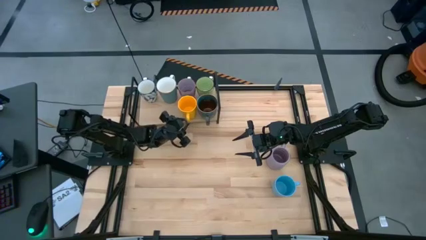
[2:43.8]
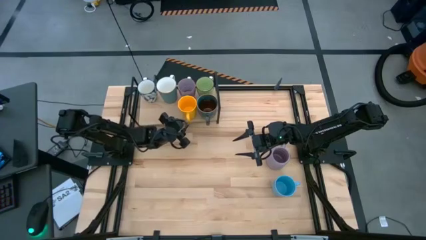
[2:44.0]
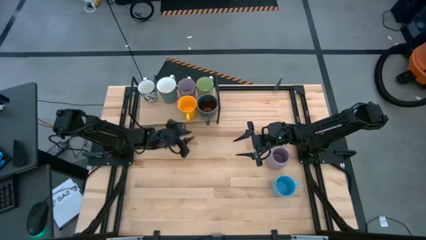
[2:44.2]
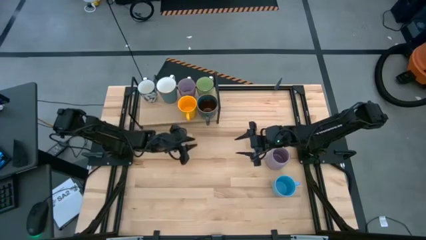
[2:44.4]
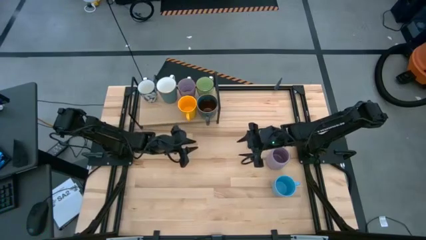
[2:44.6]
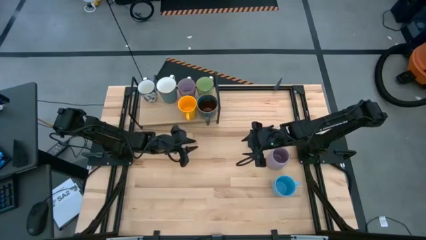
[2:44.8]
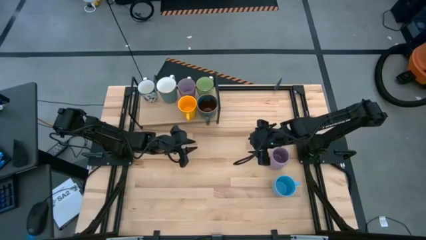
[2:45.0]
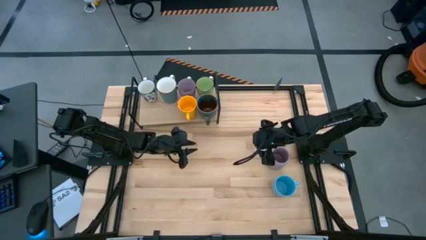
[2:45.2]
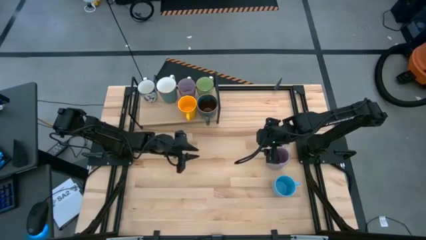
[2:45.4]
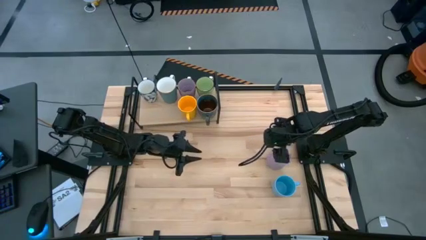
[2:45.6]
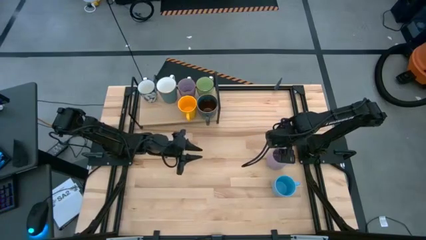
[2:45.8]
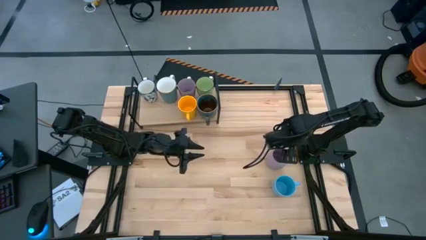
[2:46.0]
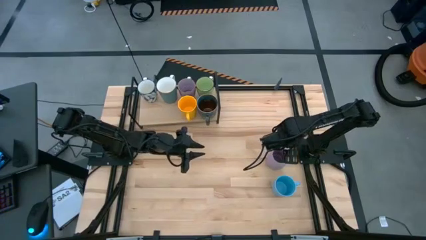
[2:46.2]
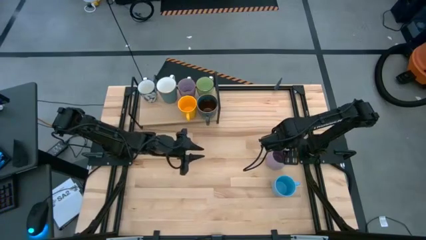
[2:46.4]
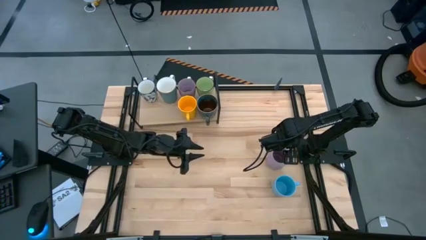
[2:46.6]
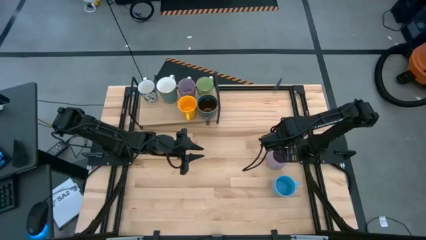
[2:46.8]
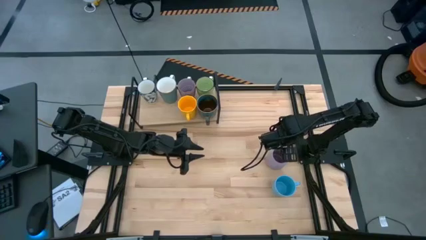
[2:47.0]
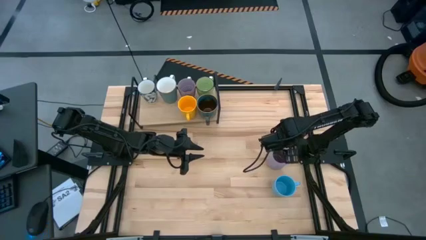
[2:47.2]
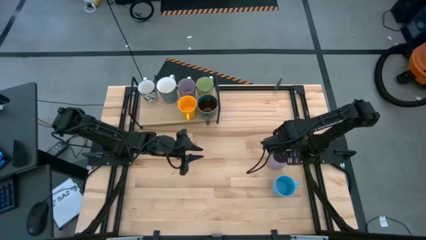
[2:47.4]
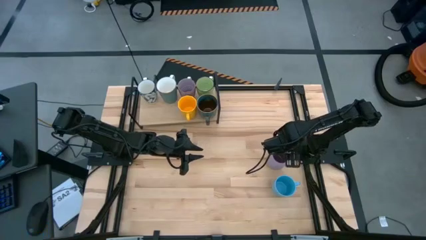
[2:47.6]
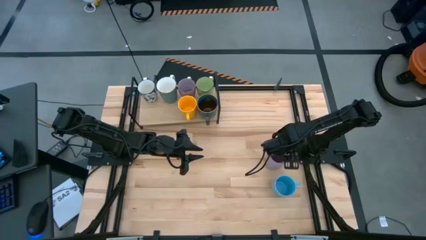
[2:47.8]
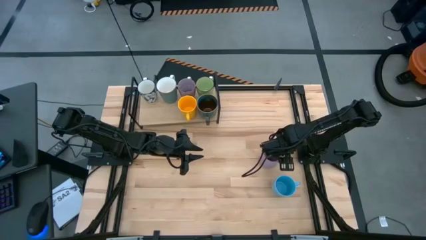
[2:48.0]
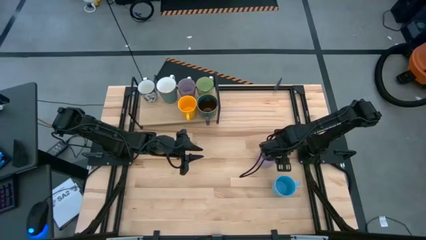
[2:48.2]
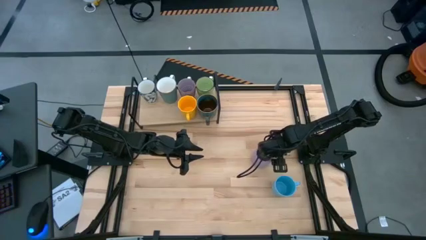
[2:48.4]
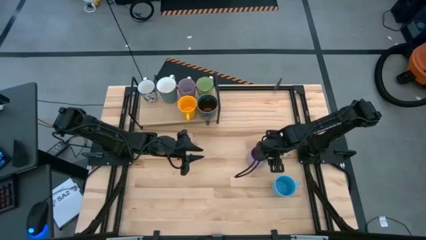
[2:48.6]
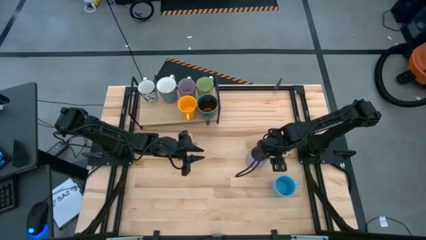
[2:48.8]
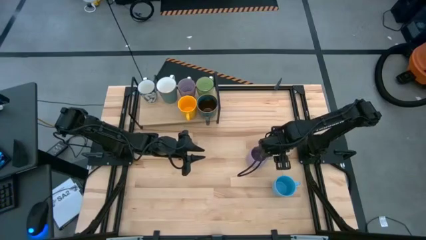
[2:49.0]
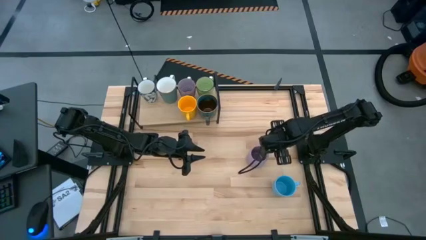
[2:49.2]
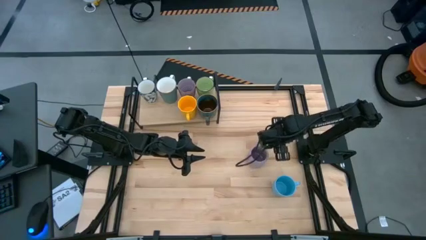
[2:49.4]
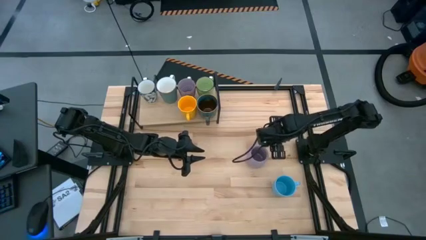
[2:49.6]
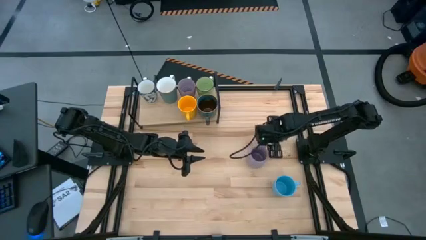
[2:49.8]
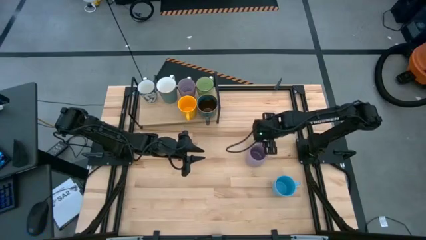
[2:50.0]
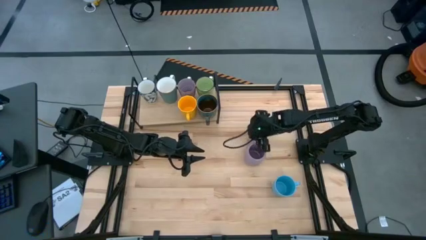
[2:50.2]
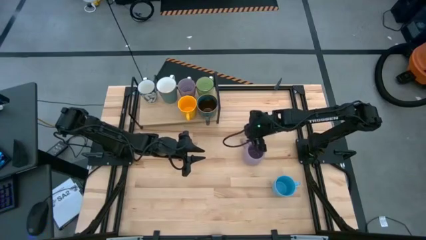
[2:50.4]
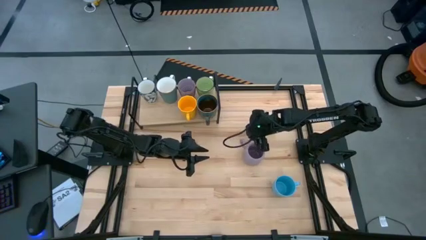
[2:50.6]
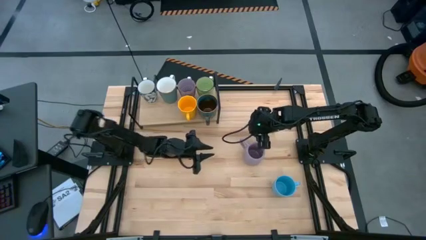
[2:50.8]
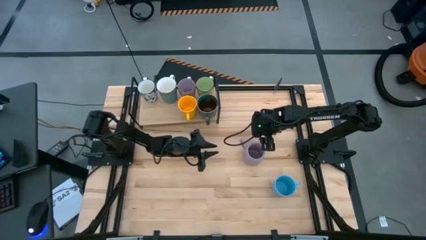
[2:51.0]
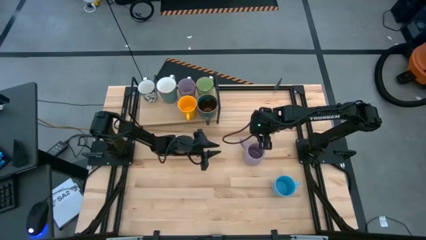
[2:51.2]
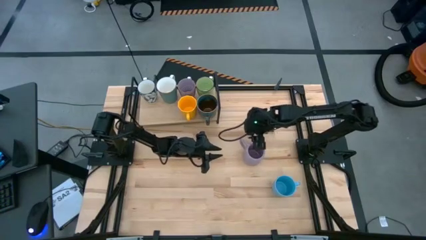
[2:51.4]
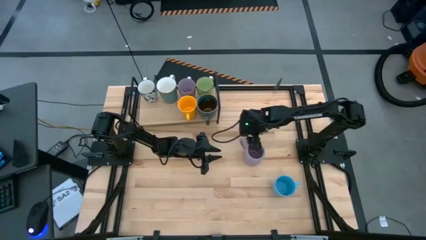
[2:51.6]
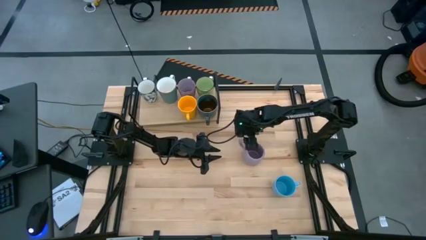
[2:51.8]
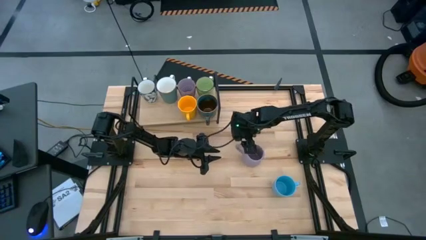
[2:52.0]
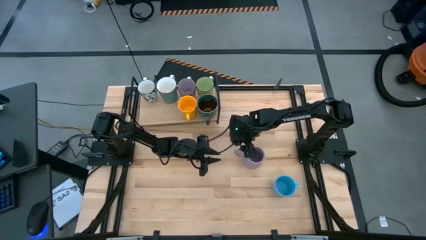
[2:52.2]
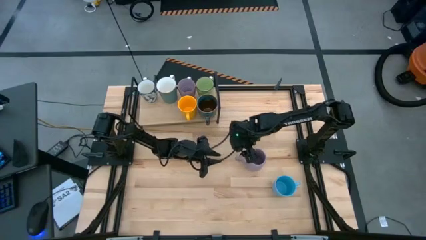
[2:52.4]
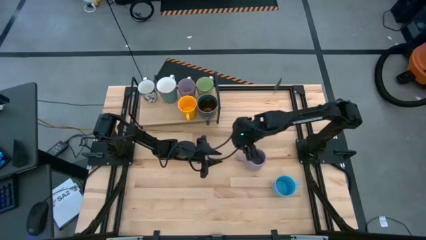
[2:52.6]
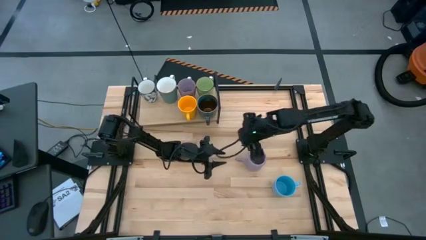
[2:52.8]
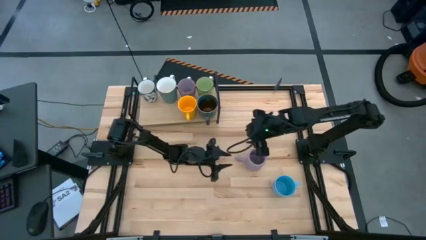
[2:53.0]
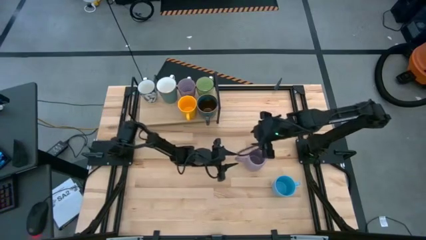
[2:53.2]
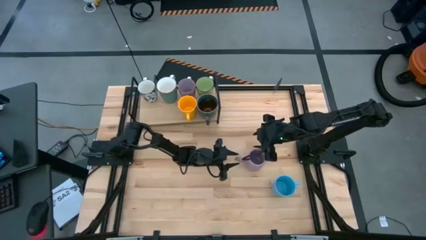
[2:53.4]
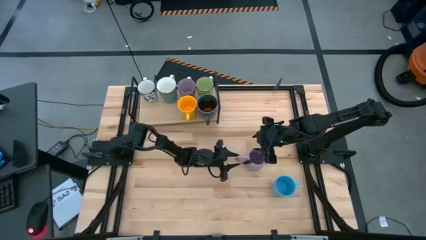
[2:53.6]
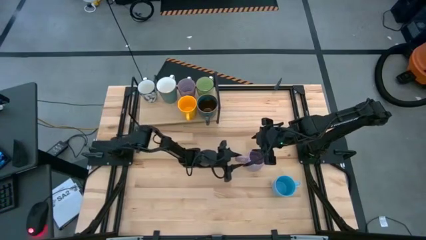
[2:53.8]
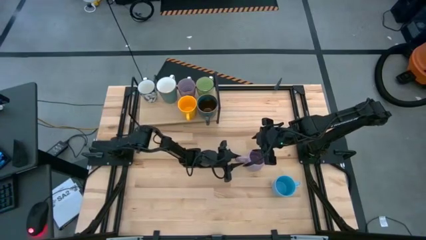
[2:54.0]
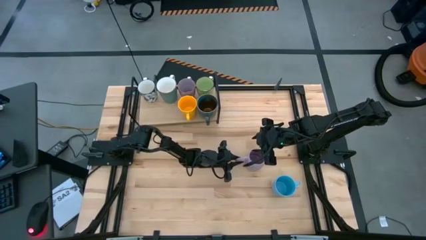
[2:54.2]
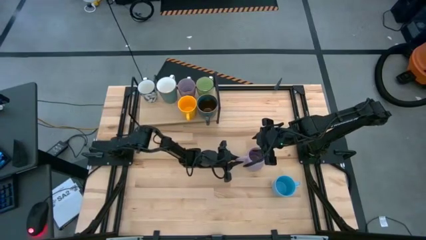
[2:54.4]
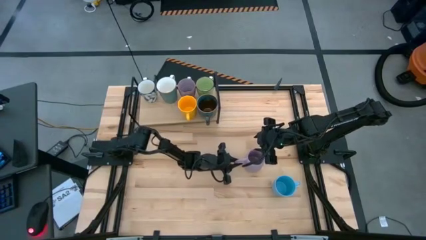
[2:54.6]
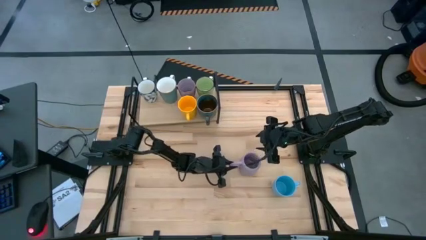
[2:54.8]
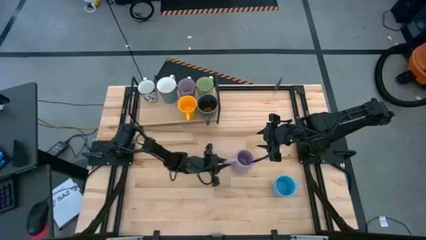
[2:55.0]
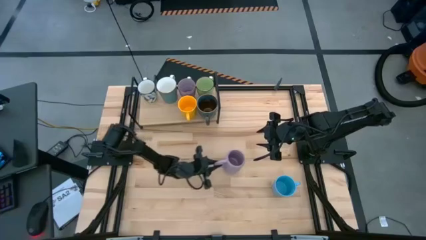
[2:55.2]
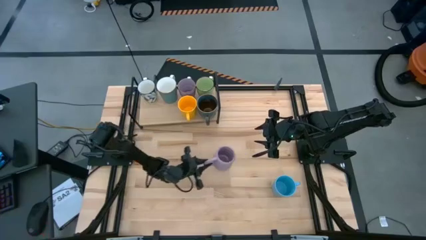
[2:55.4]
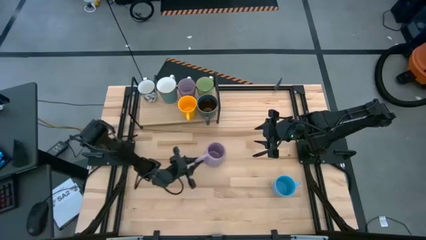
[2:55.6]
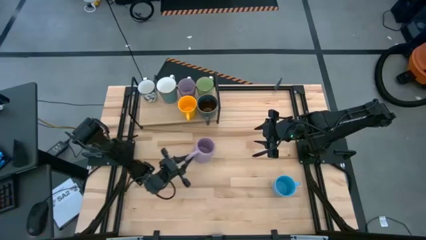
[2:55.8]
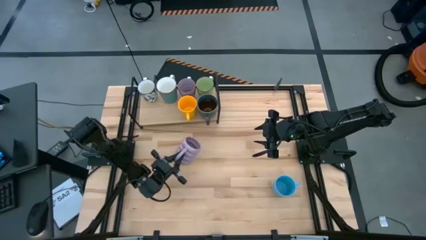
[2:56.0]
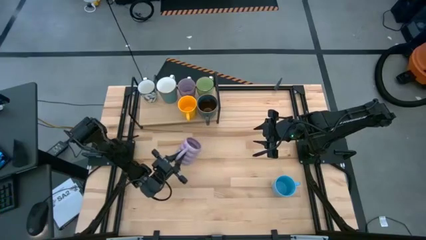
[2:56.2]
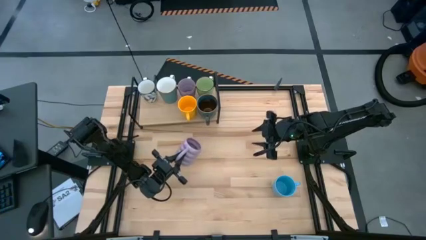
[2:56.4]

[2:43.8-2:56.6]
Task: Place coffee mugs
Put the purple mug on the shelf

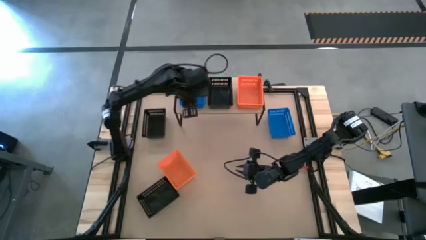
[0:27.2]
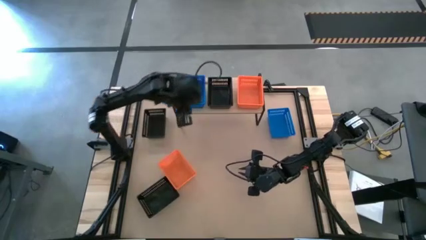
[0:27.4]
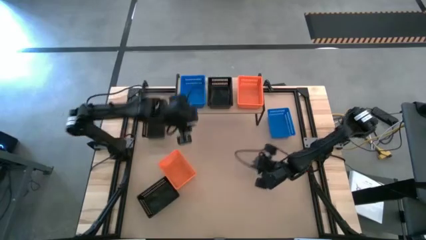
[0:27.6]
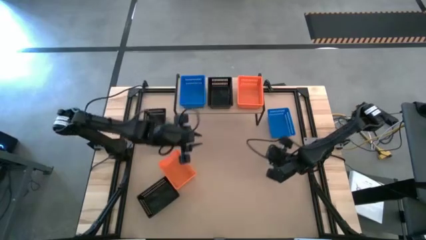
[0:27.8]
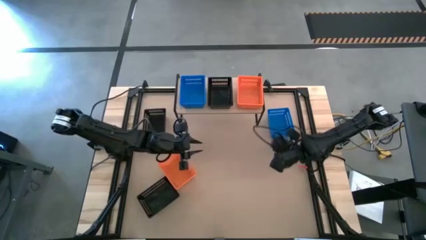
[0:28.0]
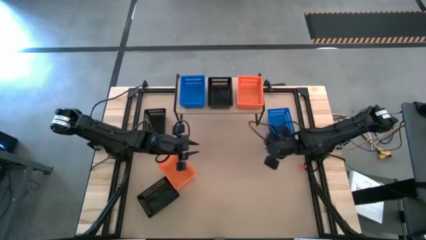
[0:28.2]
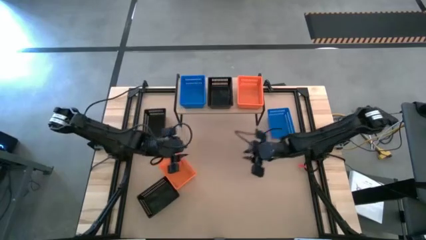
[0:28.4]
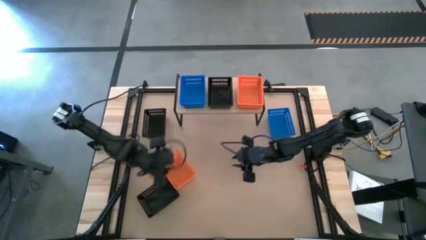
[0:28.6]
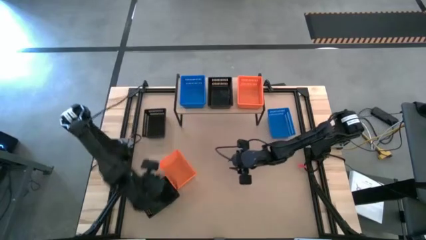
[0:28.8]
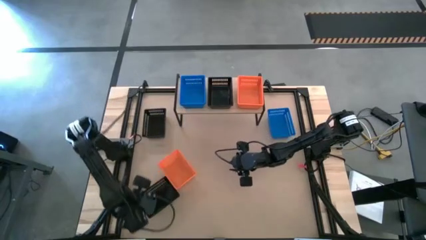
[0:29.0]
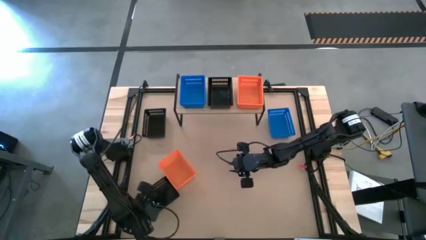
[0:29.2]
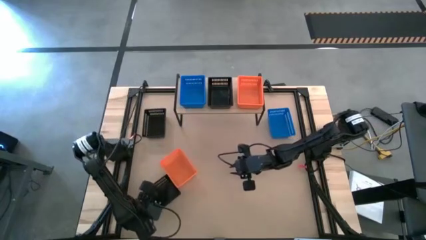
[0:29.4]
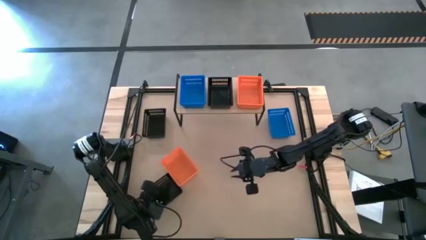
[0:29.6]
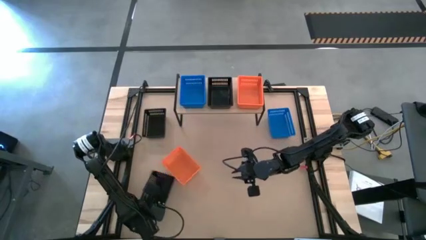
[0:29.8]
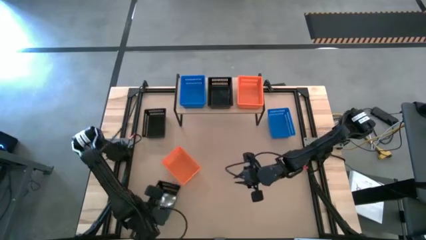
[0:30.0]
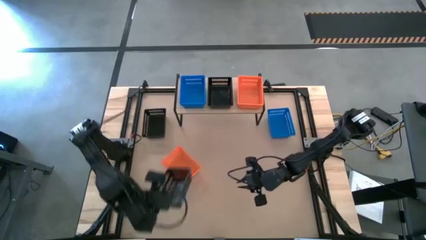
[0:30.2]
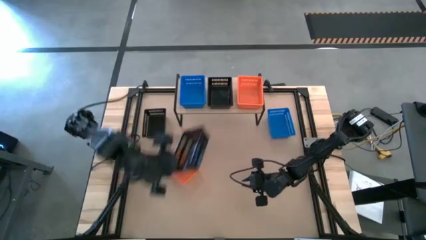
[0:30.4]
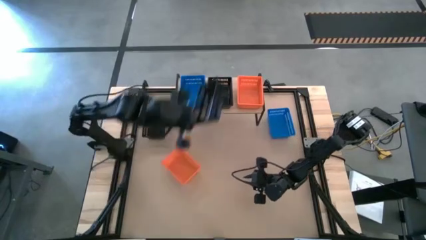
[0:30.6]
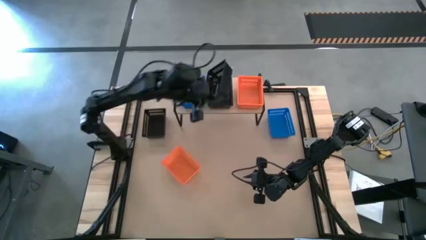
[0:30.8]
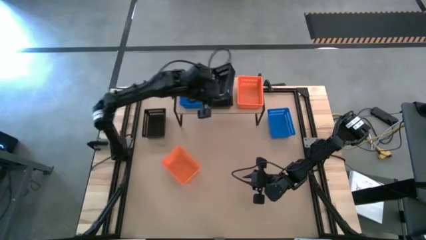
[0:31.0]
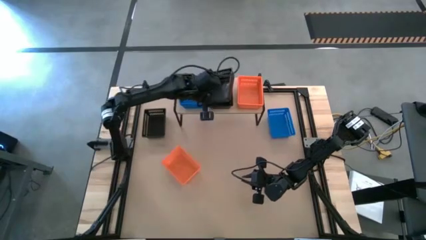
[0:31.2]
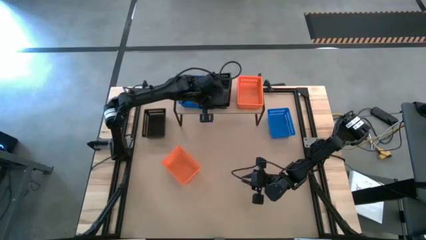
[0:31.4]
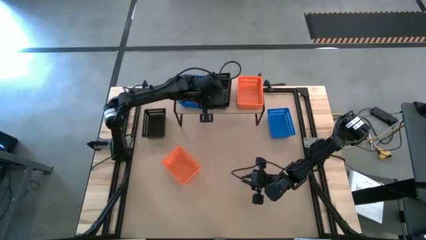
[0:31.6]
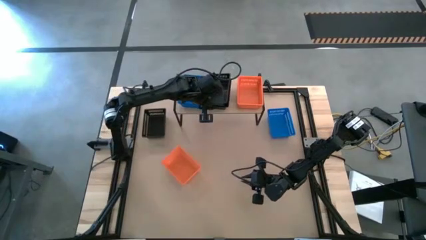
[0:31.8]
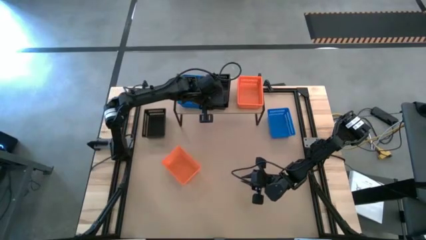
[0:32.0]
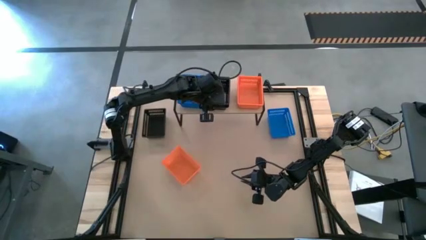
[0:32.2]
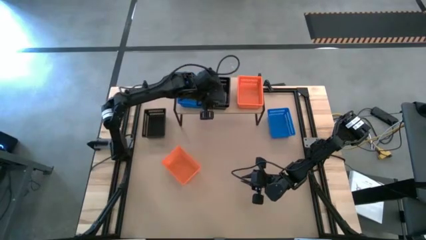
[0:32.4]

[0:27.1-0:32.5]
Task: Stack baskets on shelf by color
Stack the bottom black bin on top of the black bin on the shelf
